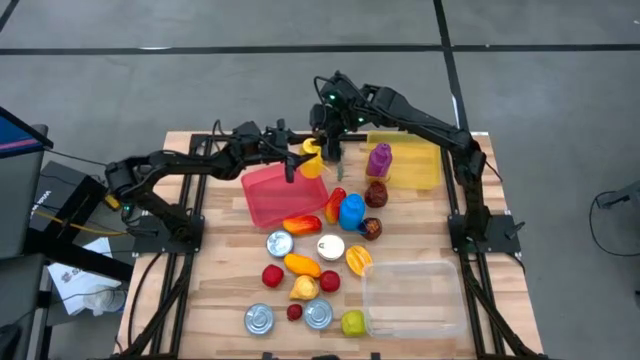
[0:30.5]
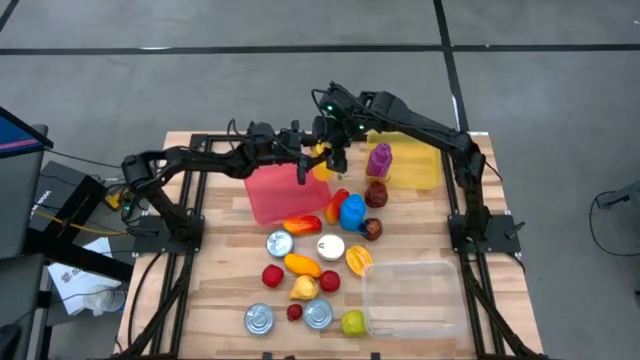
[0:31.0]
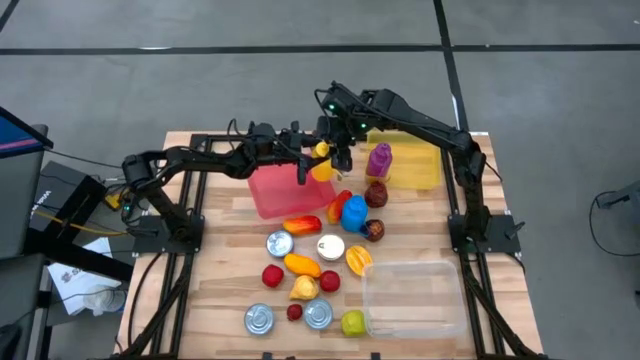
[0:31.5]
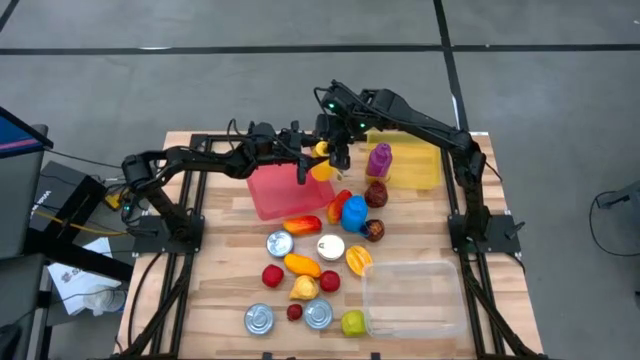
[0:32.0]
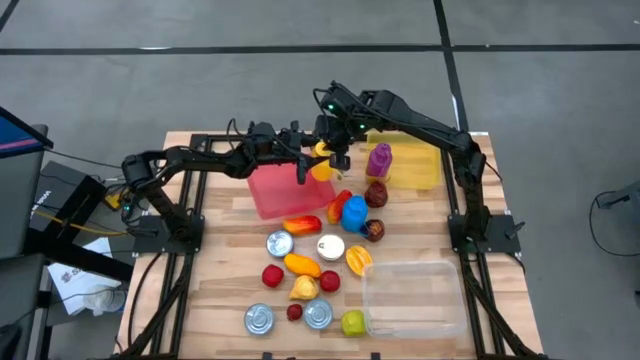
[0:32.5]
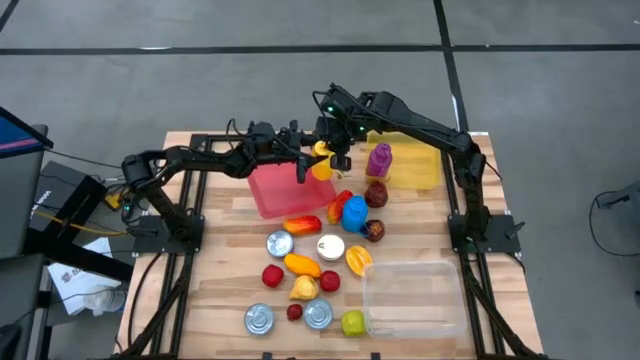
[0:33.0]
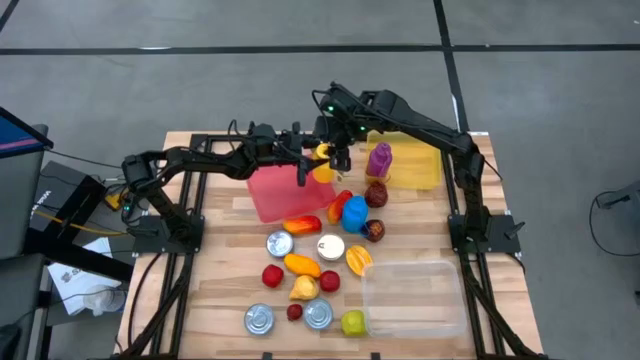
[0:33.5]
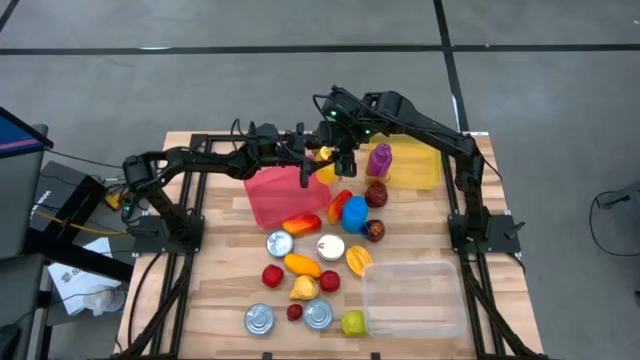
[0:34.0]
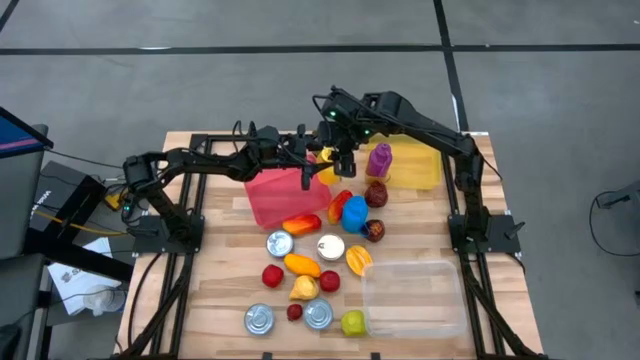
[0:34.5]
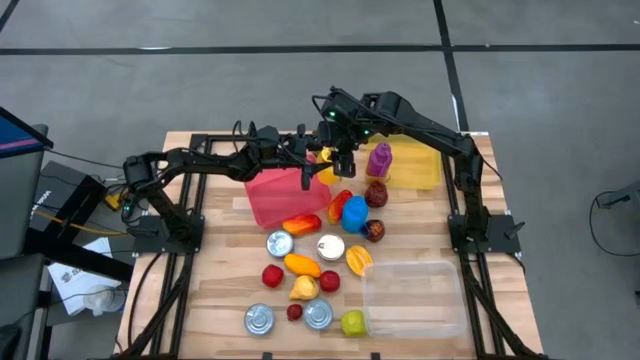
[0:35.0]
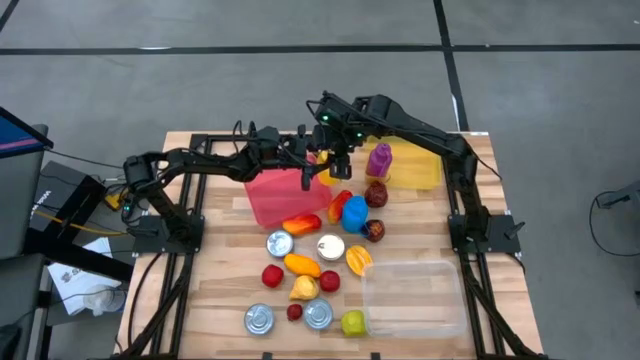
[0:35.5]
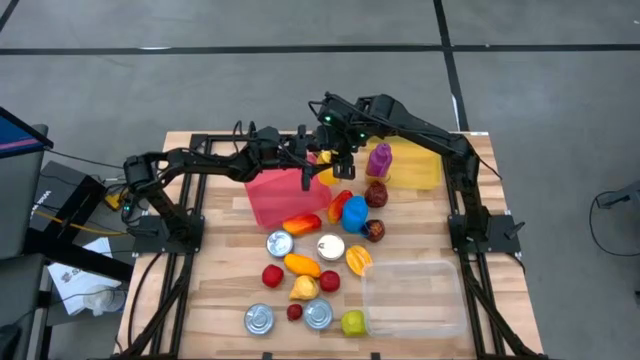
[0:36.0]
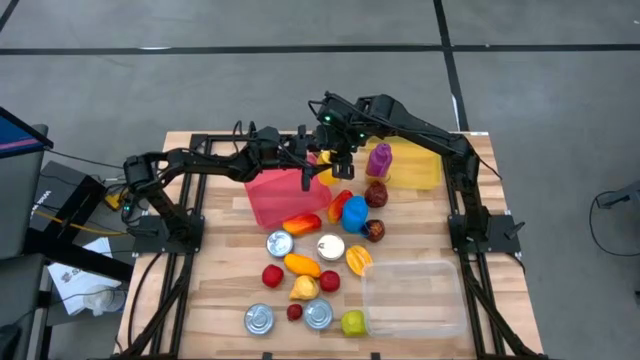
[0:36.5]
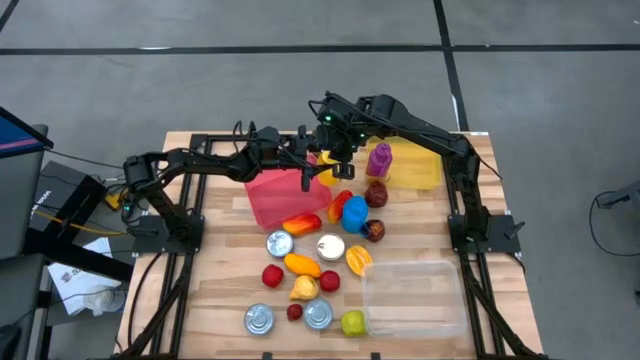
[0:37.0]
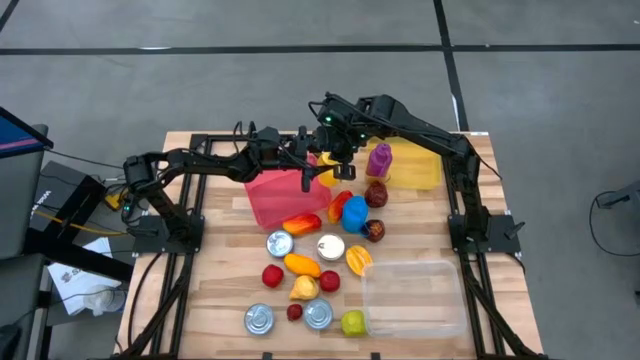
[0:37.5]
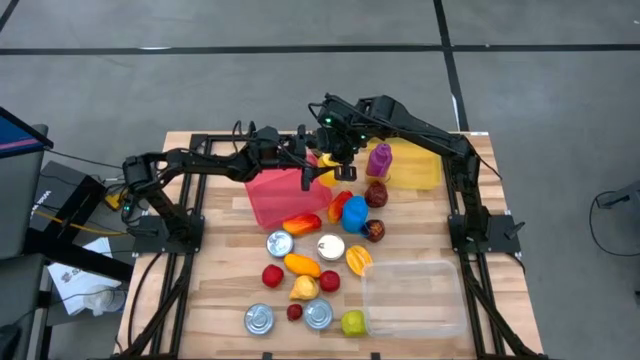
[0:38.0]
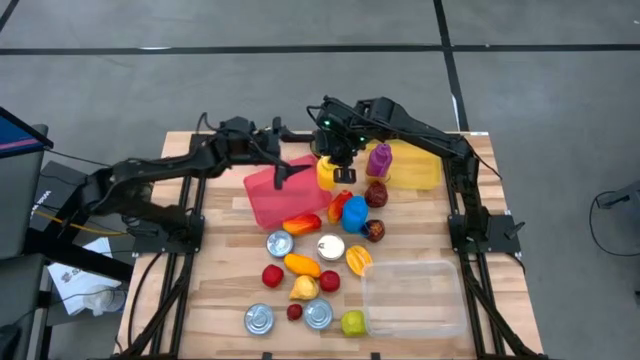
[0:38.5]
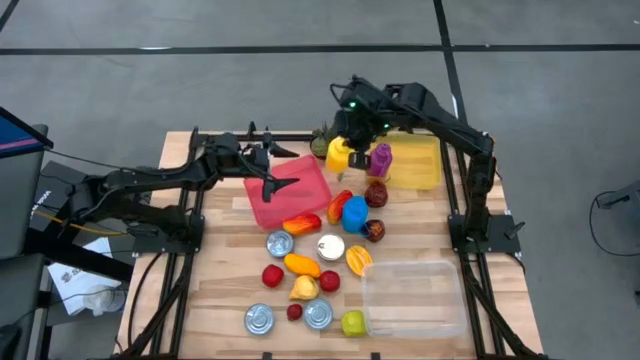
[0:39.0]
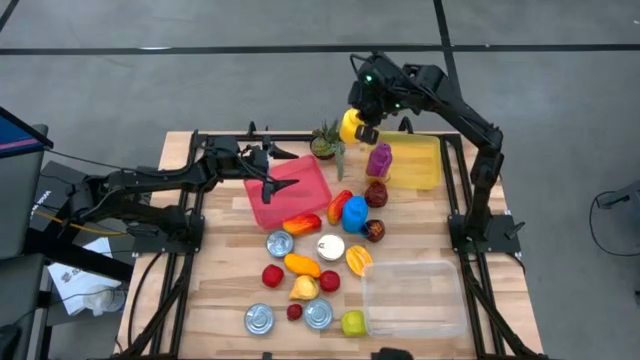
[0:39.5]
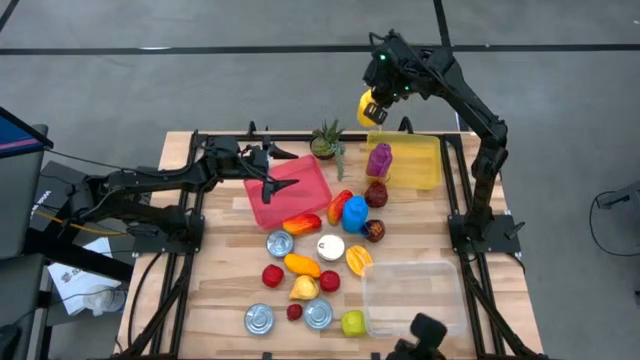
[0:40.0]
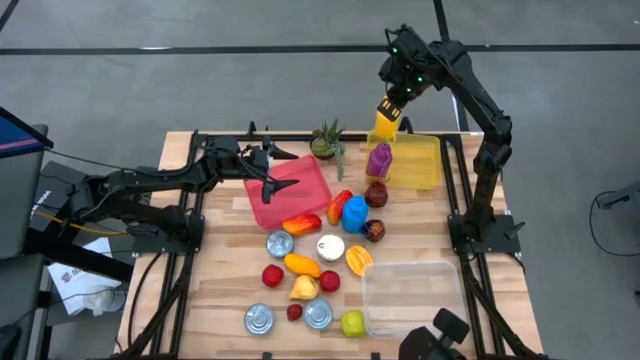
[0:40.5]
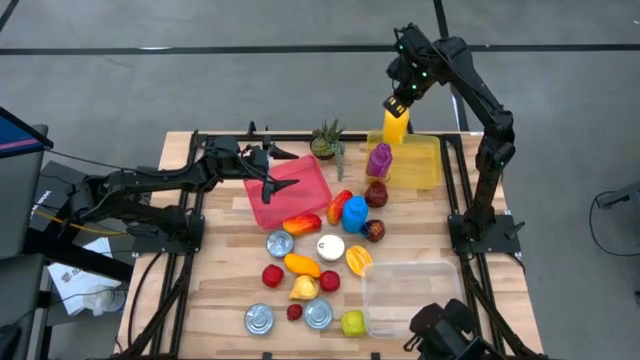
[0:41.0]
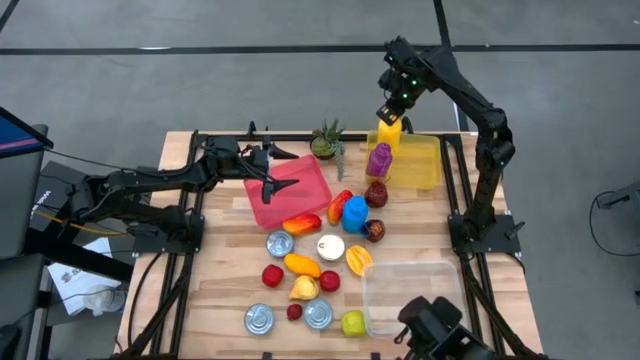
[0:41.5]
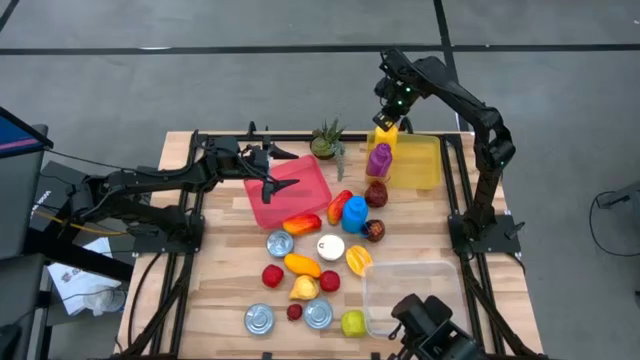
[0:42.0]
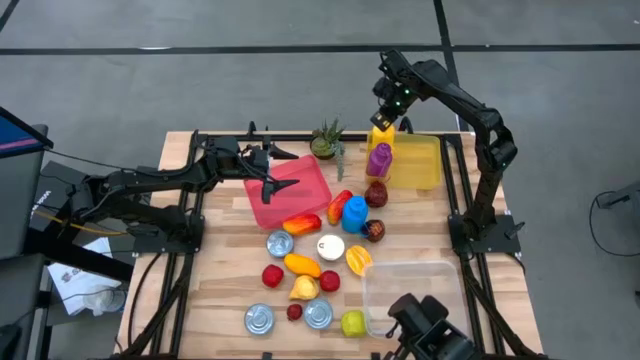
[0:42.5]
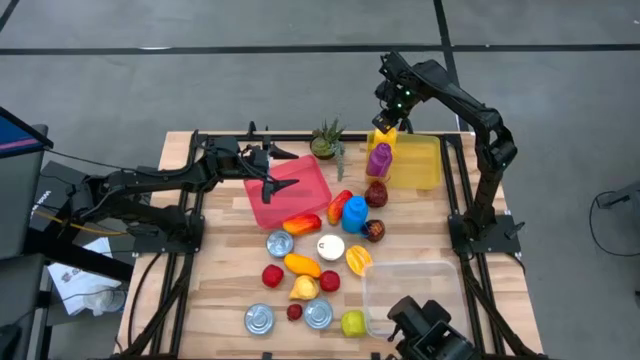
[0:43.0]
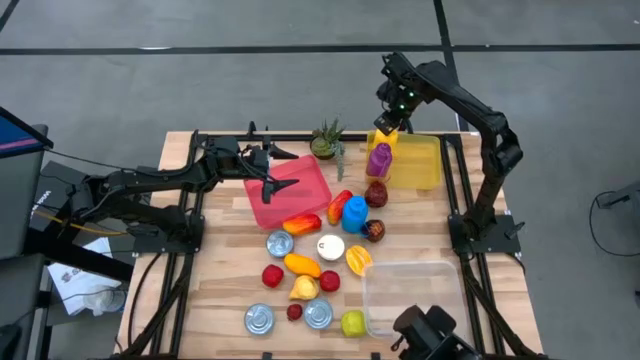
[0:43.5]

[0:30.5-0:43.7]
Task: Pick & Place Food Item
Put the yellow water bottle into the yellow bin

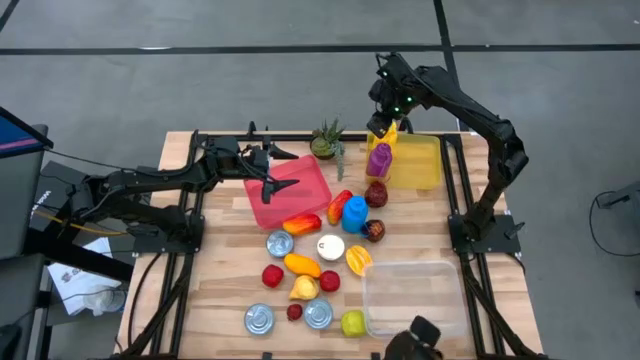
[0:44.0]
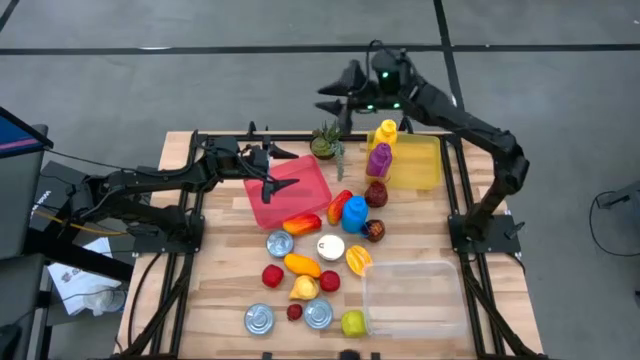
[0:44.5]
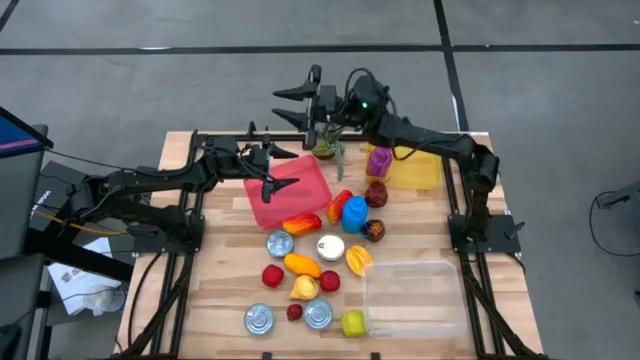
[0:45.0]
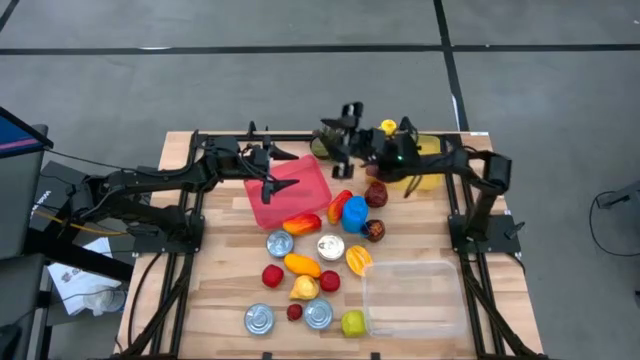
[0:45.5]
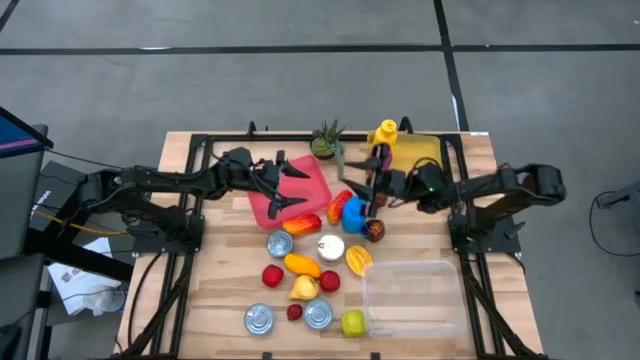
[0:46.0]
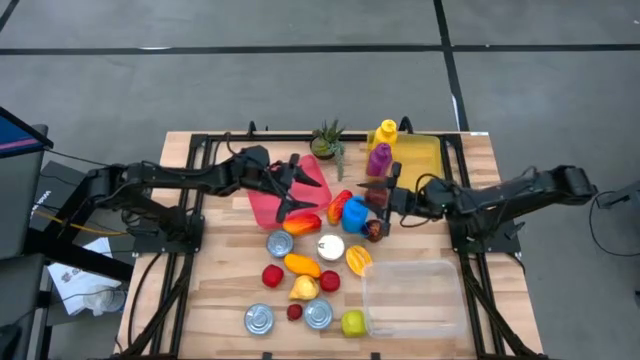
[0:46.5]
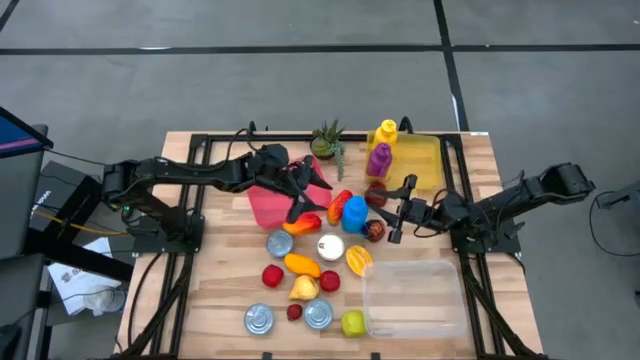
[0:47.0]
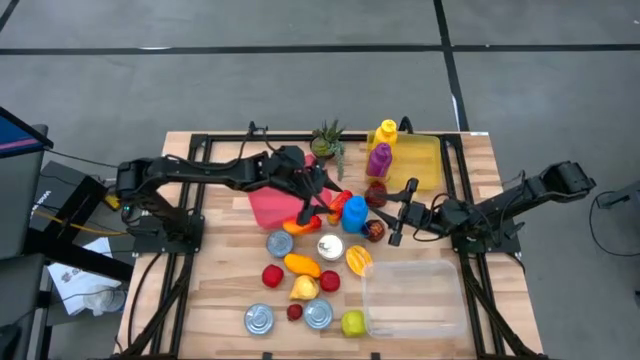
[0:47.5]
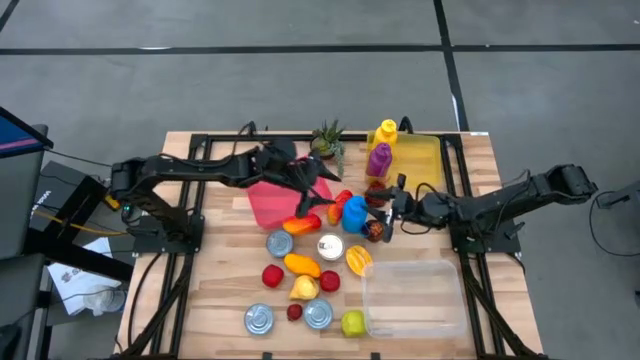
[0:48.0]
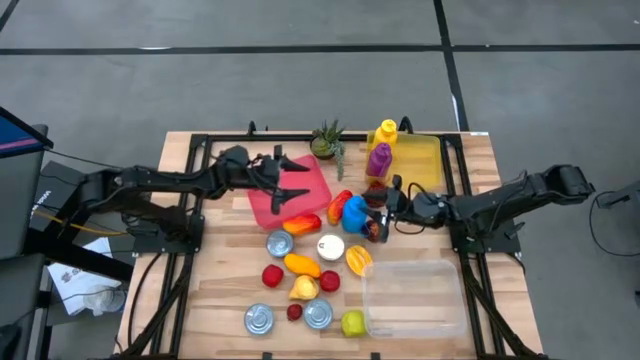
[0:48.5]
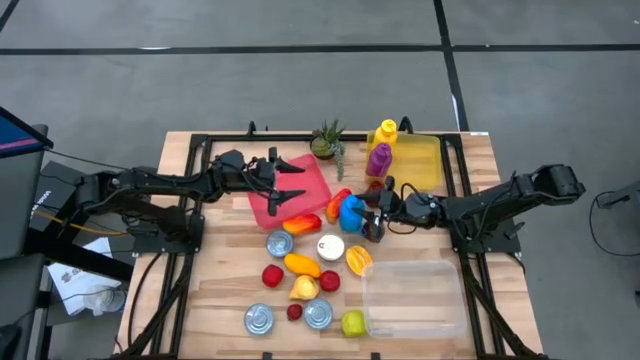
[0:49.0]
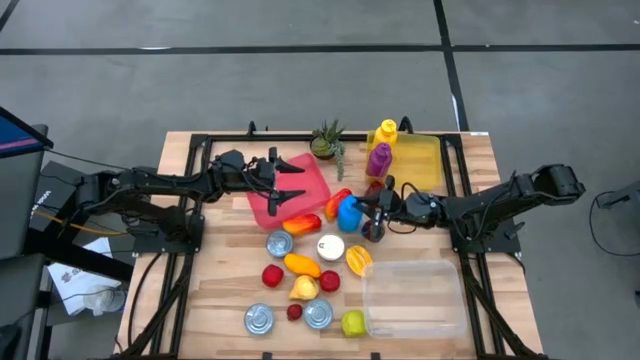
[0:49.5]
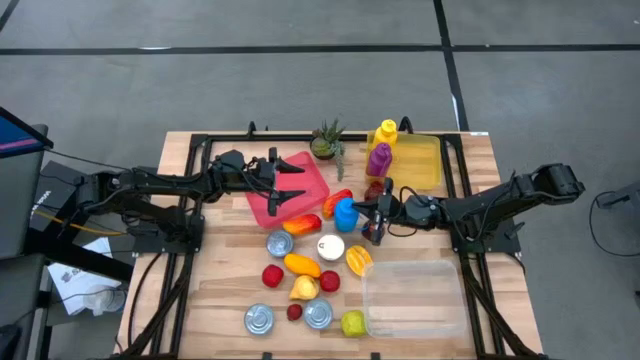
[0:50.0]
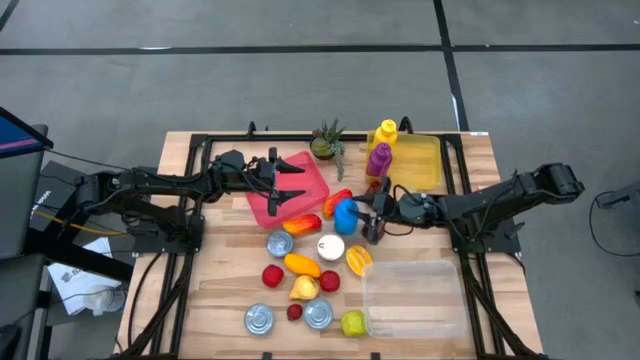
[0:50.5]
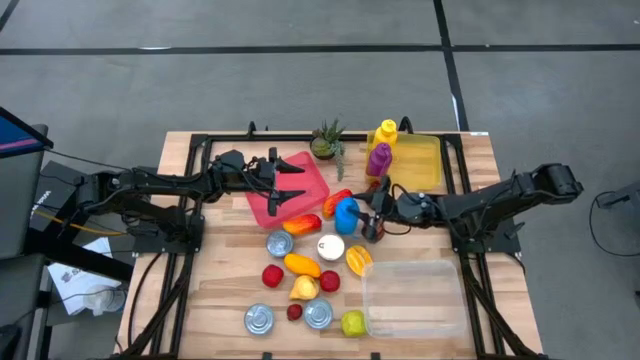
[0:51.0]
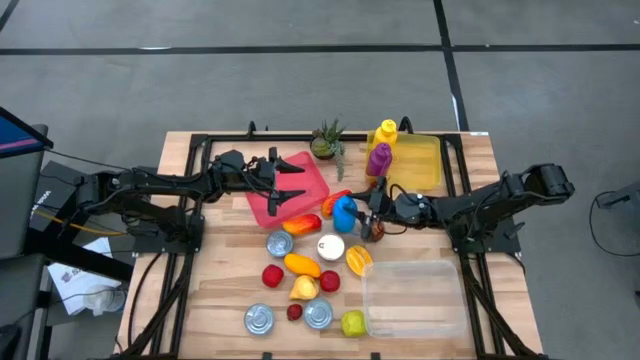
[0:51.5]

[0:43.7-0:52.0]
Put the blue water bottle into the yellow bin
